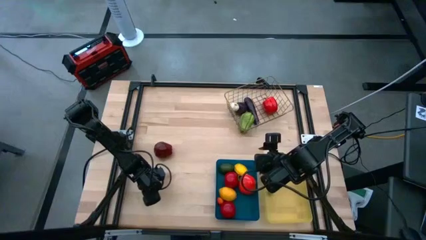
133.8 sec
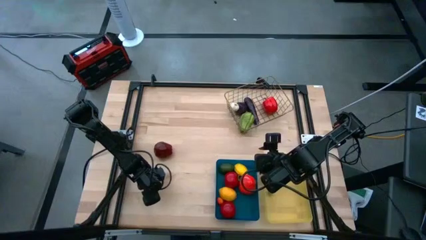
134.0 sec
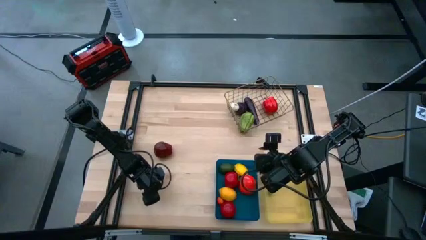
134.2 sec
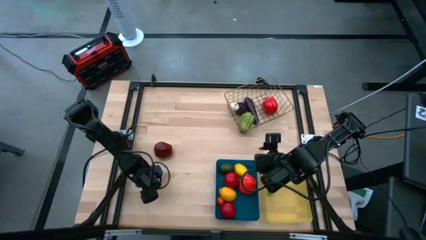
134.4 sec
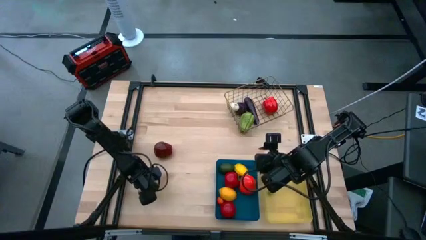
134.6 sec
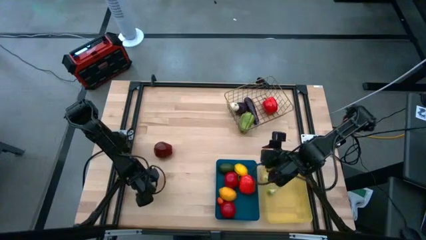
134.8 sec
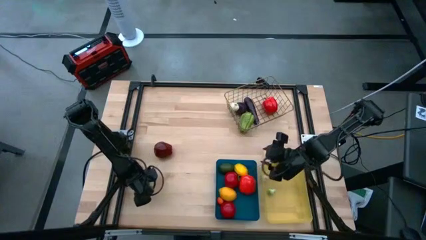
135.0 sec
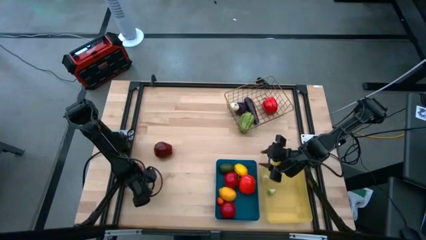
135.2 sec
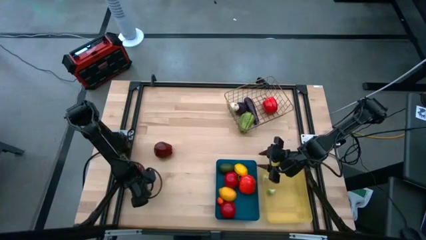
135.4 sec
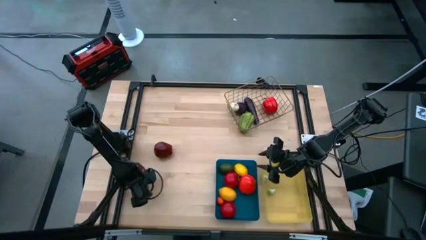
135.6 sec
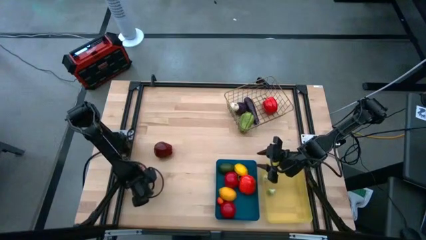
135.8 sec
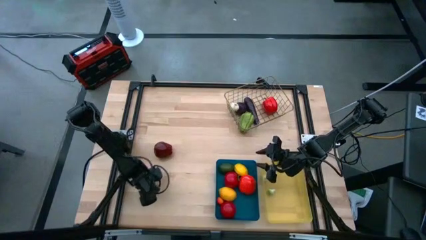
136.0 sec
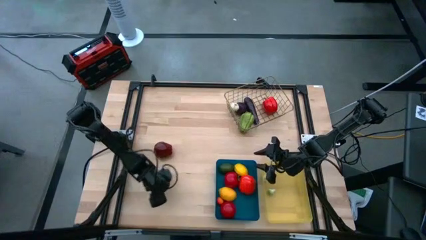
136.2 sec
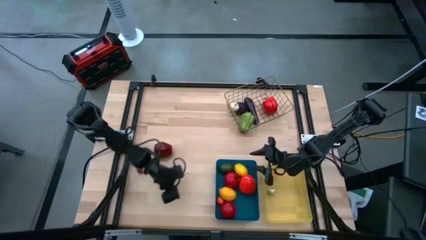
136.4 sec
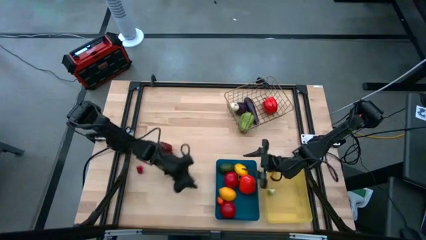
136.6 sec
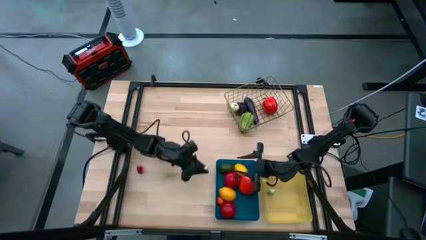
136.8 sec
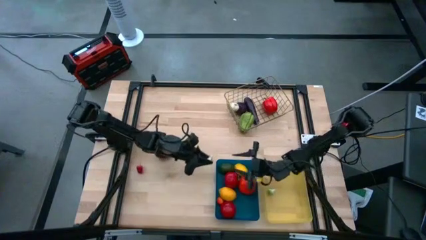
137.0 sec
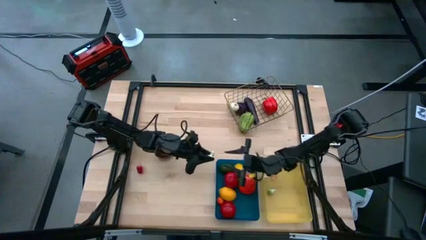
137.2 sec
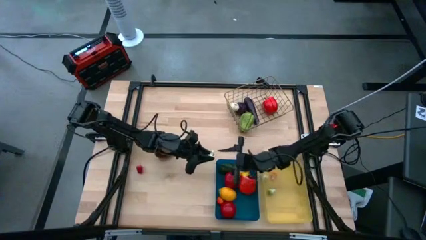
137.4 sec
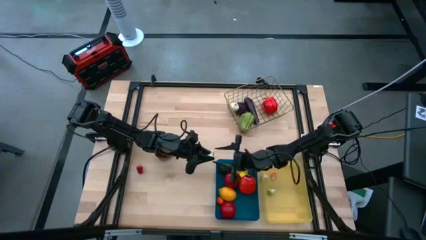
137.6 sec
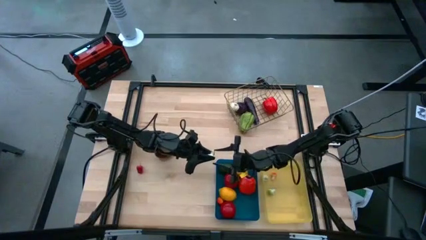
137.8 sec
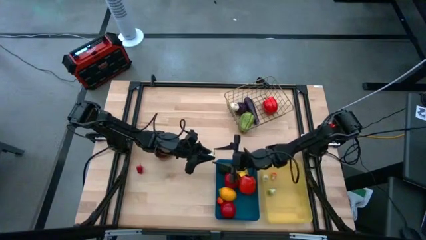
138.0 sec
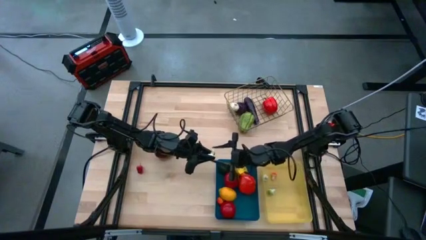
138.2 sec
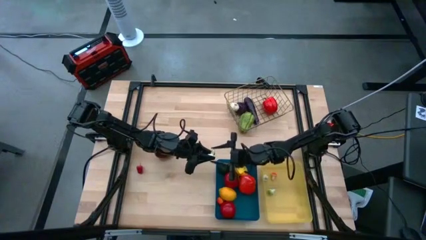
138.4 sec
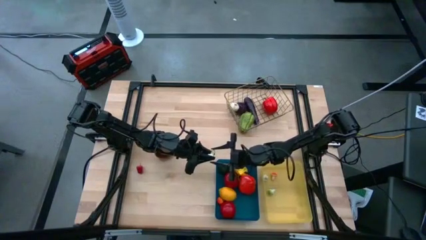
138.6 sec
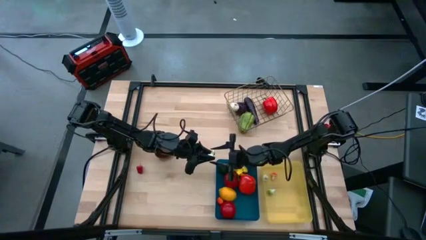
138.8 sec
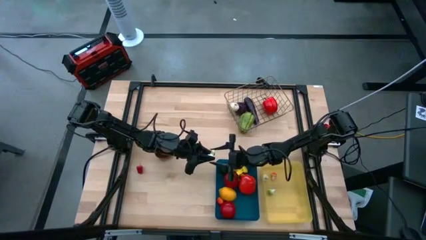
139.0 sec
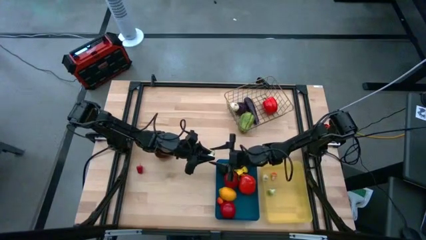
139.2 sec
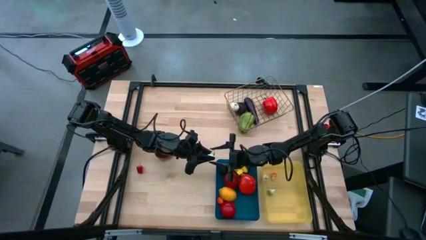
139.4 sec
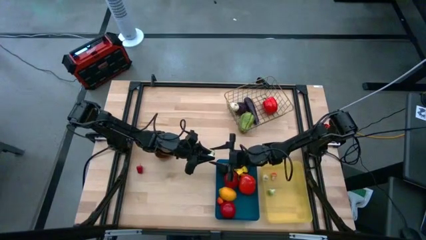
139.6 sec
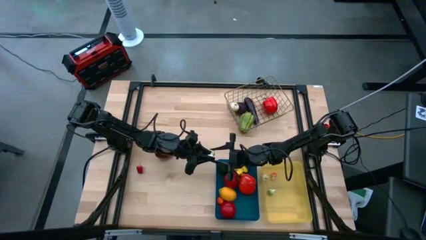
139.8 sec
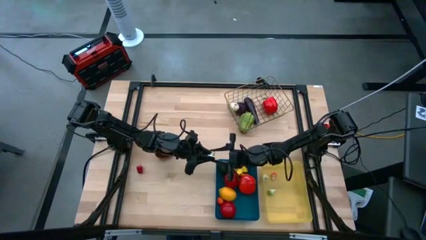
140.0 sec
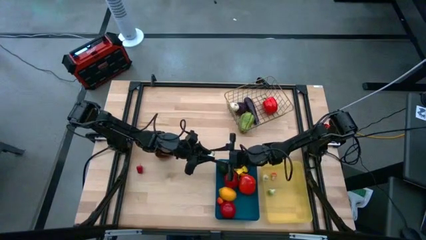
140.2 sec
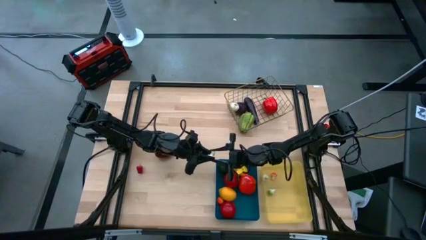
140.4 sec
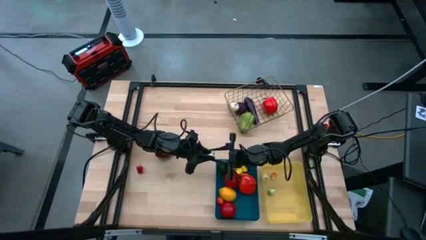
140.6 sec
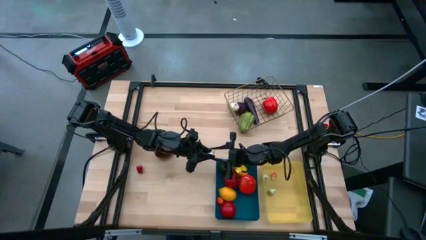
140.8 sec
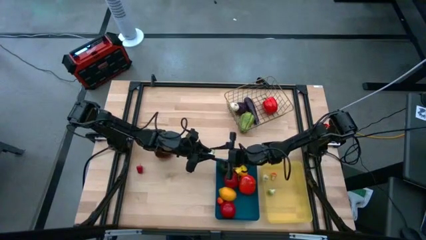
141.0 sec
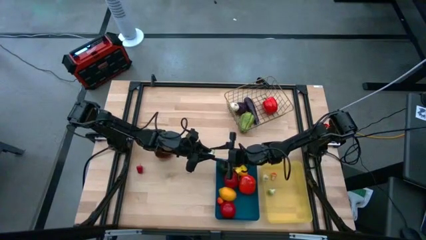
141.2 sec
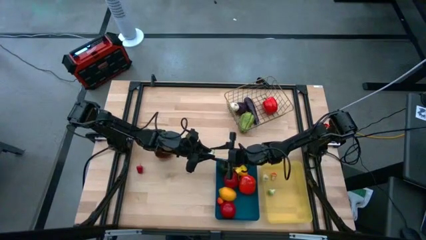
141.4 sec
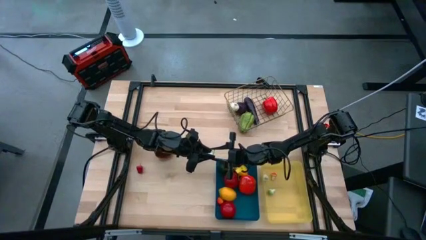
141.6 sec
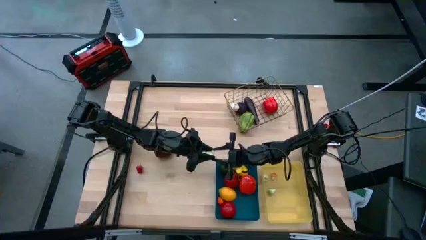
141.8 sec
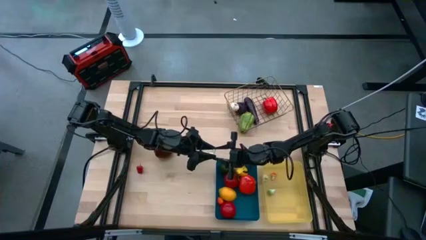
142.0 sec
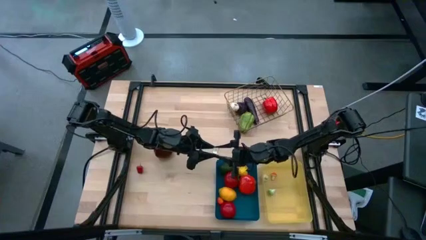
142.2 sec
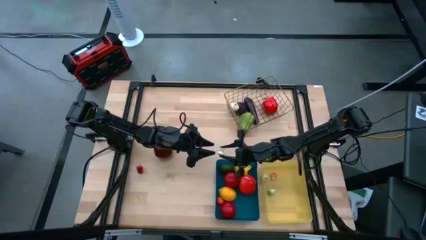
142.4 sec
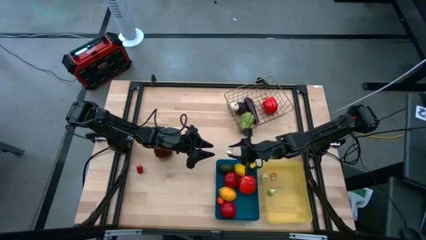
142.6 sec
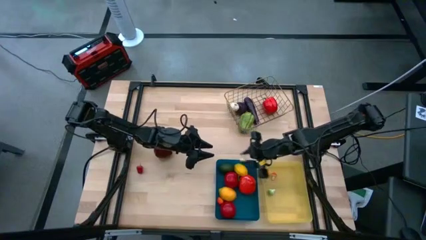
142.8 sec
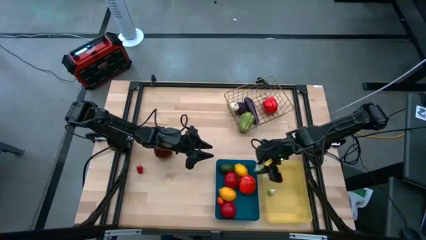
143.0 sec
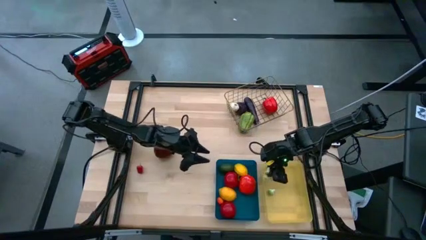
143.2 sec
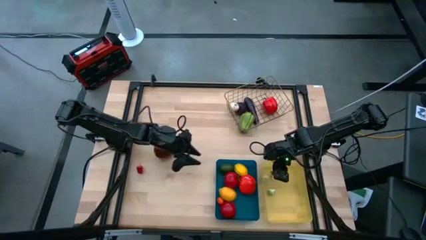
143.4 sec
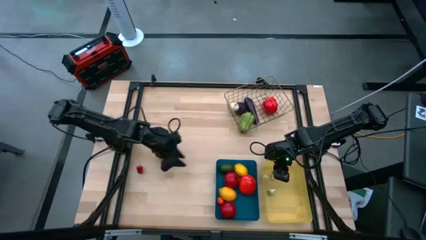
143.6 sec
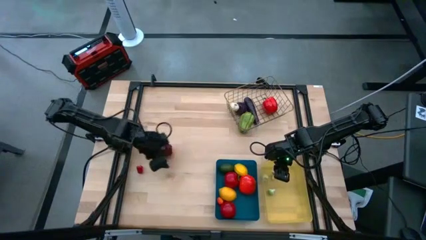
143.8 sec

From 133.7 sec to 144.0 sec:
Task: Sort produce into baskets
Put the green mushroom into the yellow bin

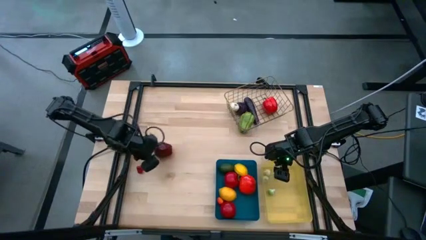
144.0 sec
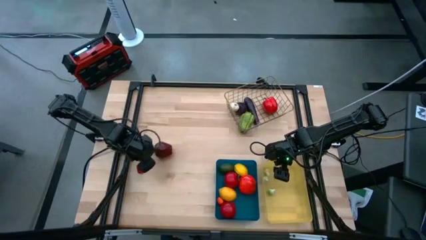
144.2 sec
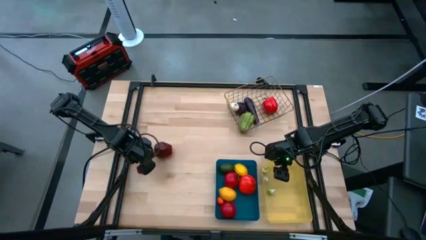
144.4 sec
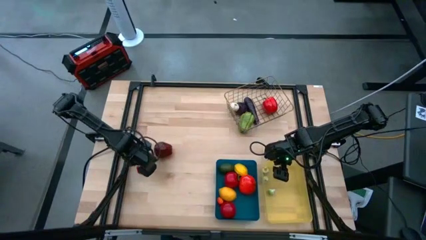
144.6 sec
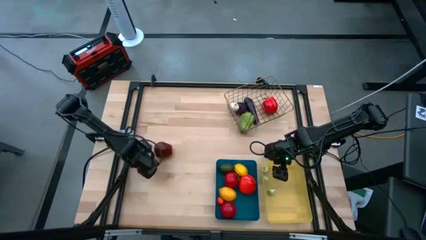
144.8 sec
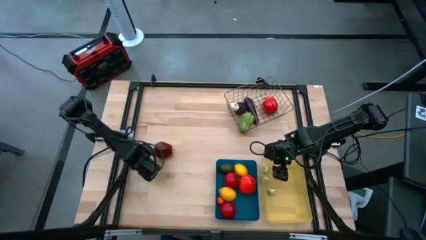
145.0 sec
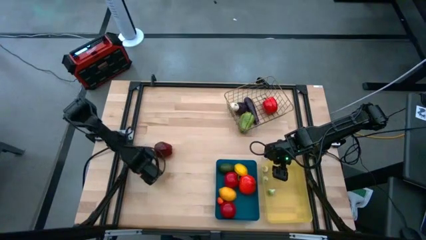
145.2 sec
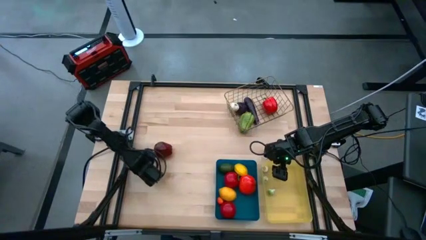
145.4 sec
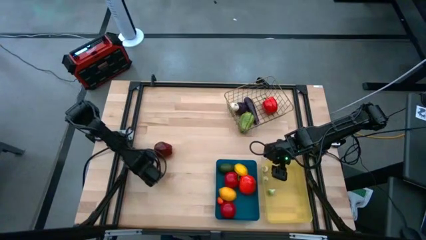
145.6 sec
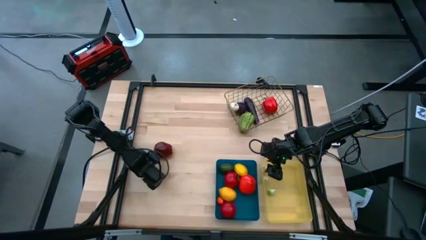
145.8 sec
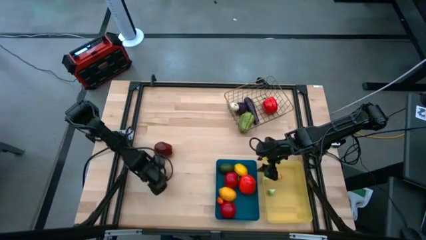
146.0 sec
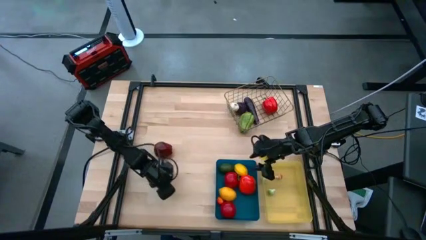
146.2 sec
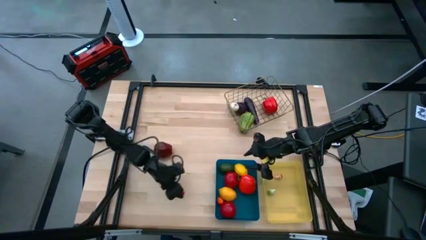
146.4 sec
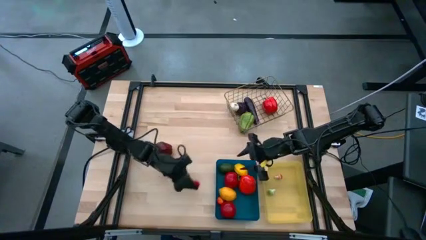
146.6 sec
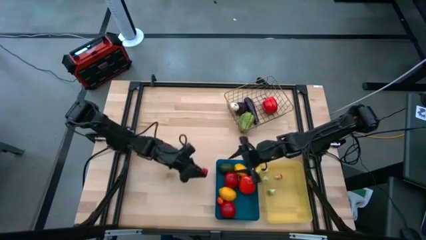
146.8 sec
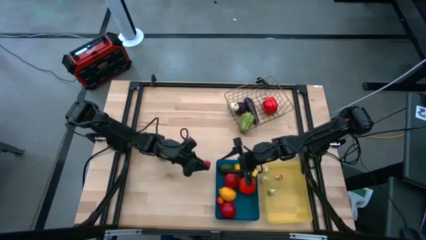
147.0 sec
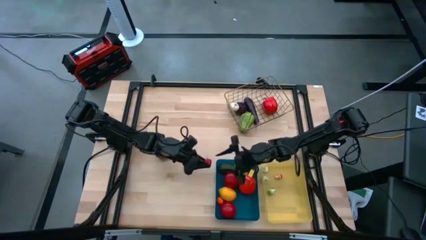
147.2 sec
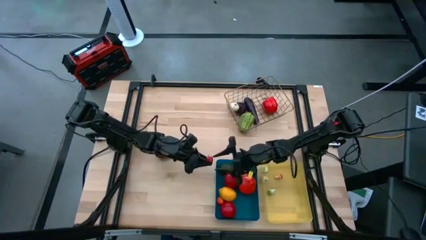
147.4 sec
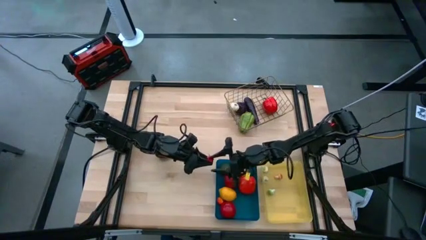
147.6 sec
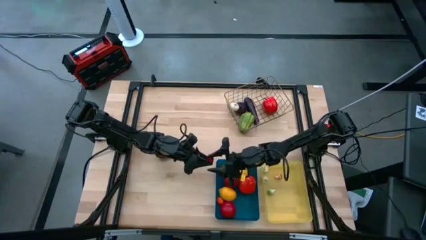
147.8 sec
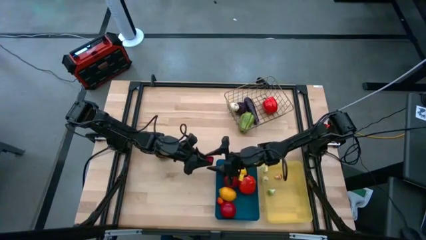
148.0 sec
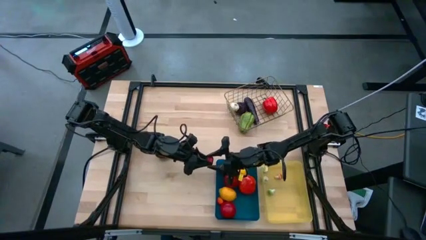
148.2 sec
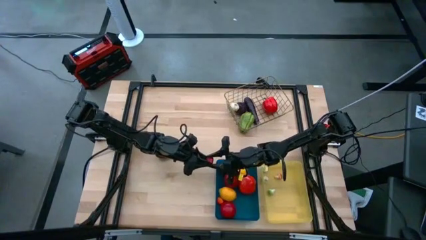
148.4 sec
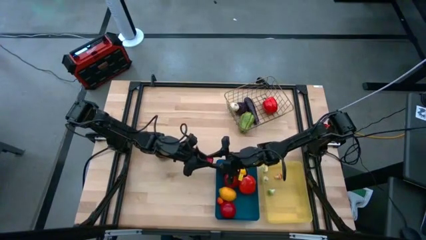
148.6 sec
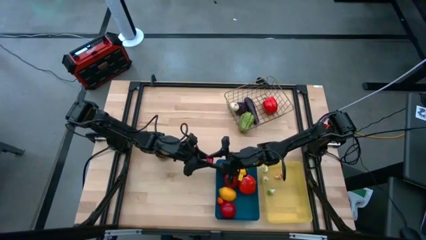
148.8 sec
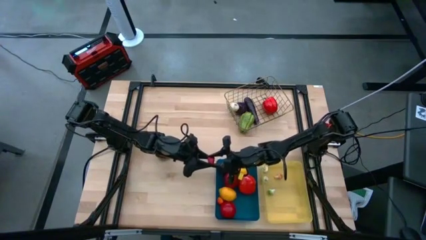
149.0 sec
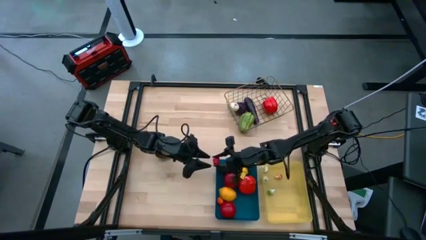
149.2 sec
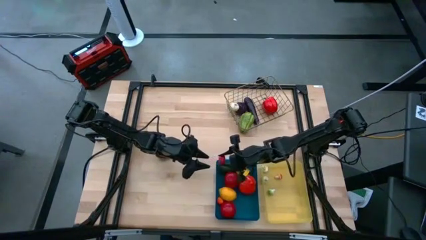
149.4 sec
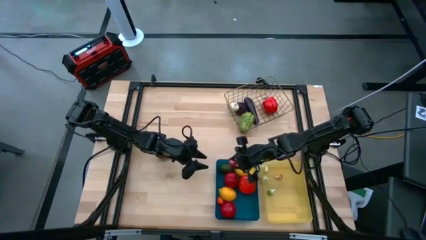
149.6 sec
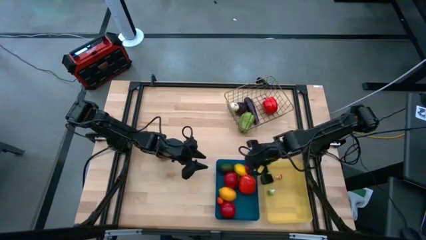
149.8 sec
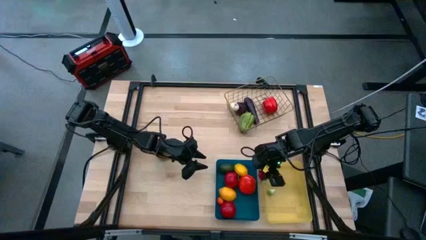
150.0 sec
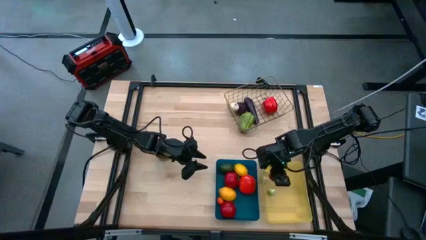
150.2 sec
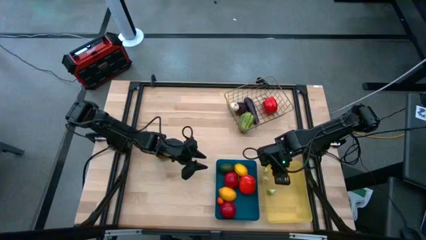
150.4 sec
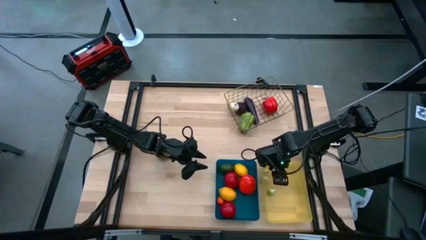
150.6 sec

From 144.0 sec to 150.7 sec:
Put the red chili pepper into the yellow bin
